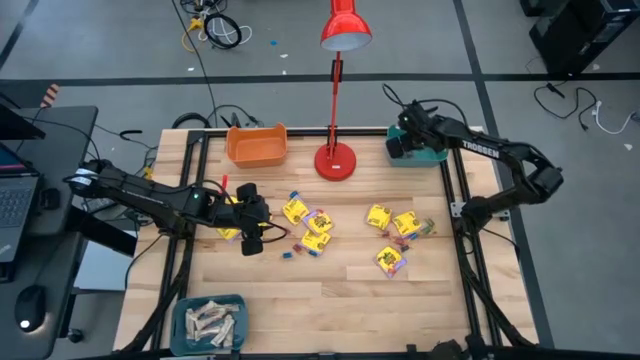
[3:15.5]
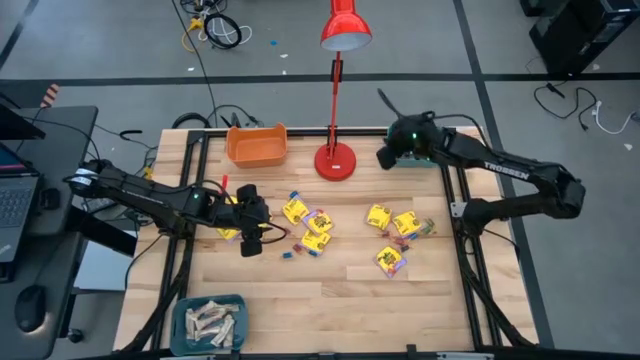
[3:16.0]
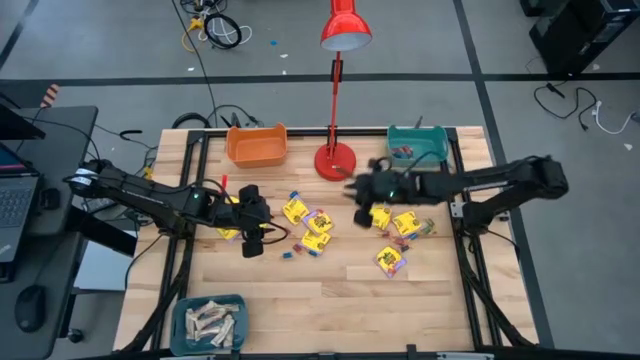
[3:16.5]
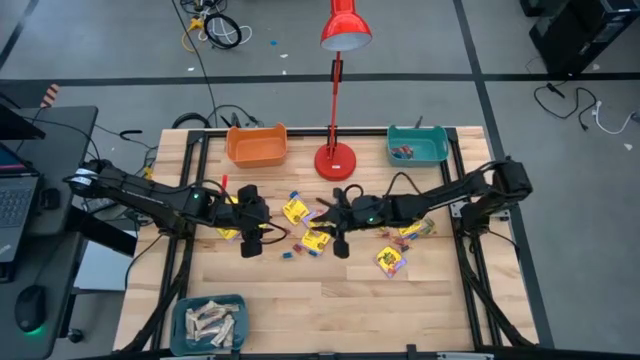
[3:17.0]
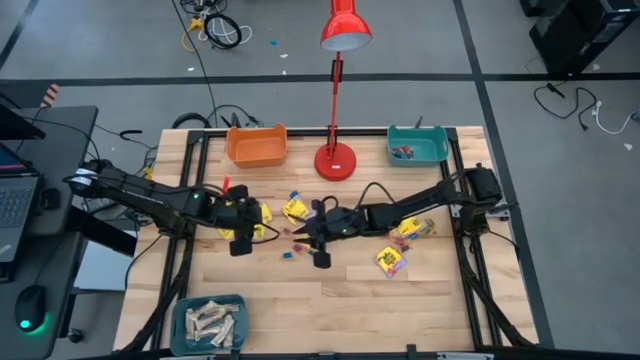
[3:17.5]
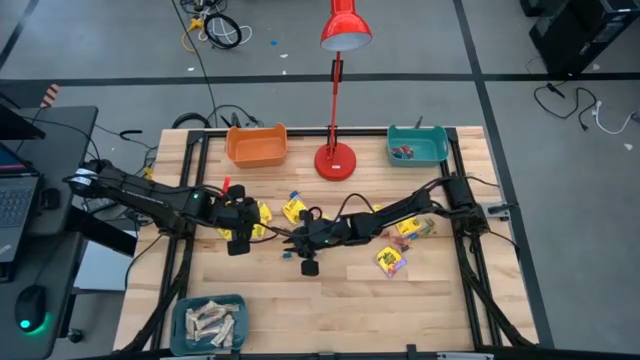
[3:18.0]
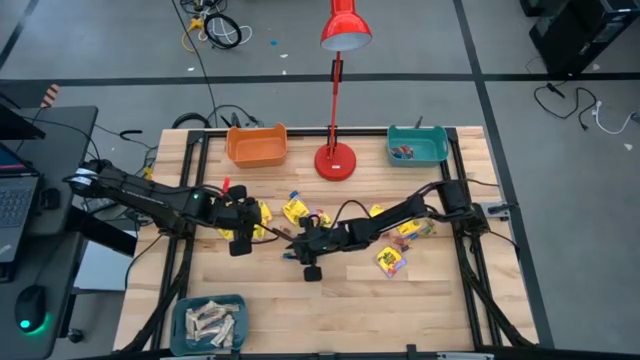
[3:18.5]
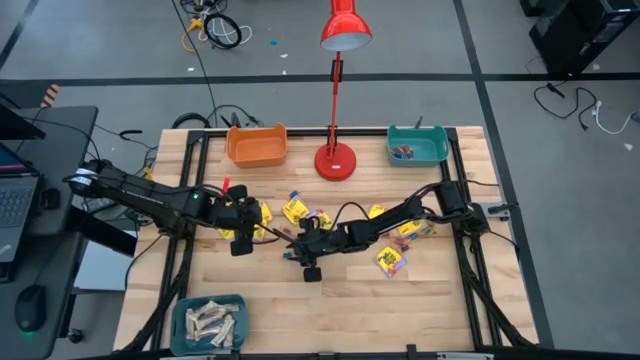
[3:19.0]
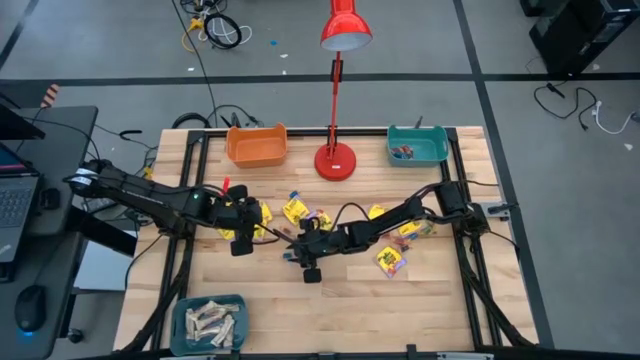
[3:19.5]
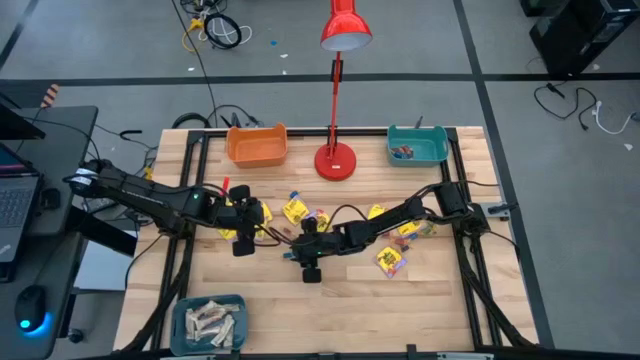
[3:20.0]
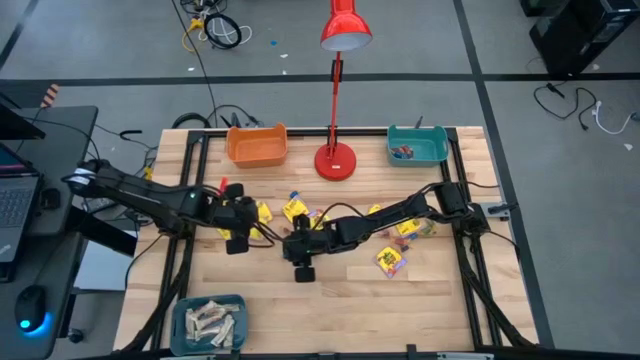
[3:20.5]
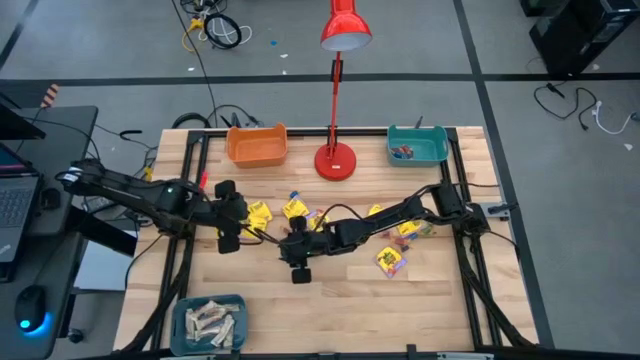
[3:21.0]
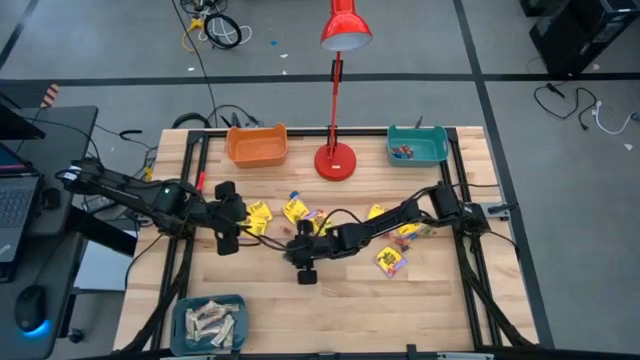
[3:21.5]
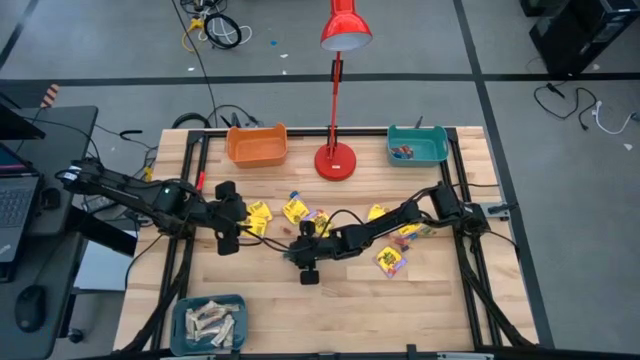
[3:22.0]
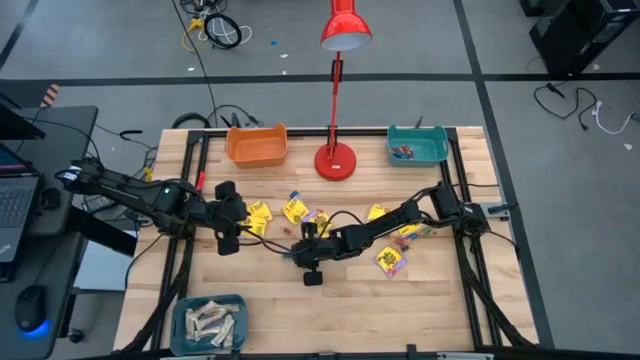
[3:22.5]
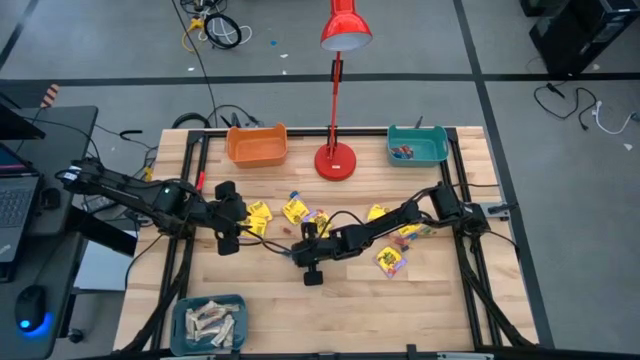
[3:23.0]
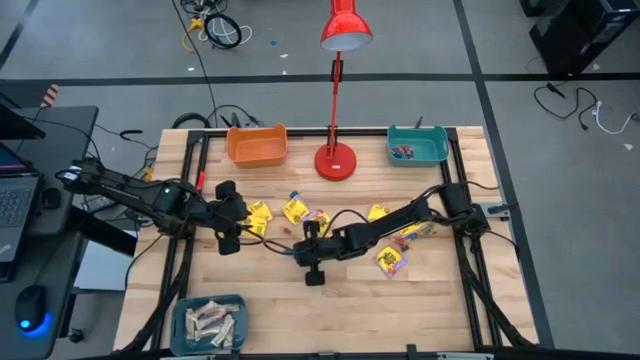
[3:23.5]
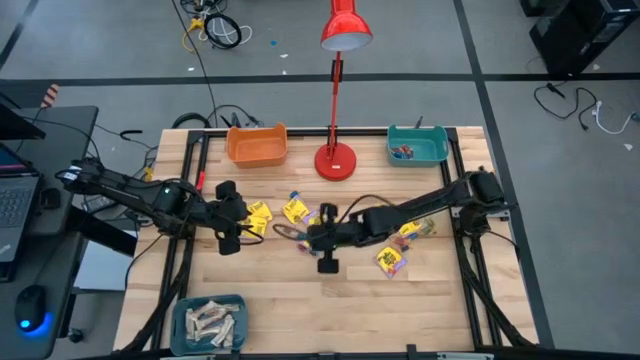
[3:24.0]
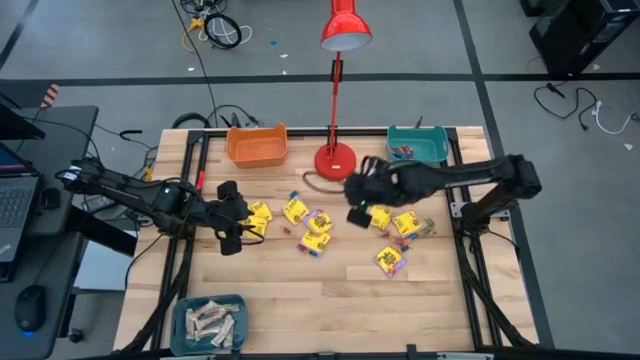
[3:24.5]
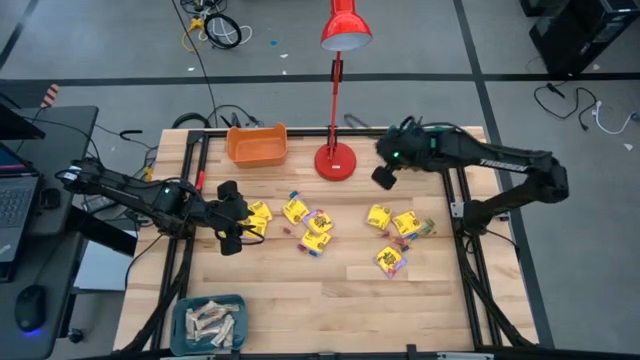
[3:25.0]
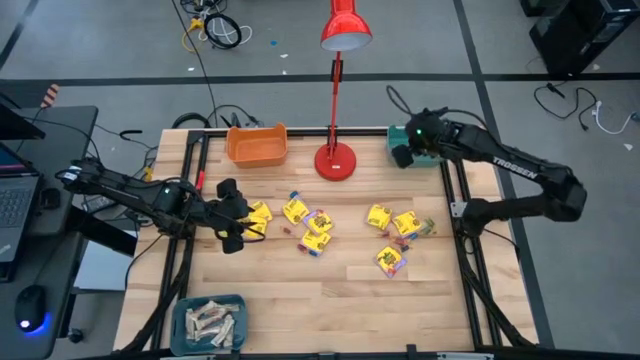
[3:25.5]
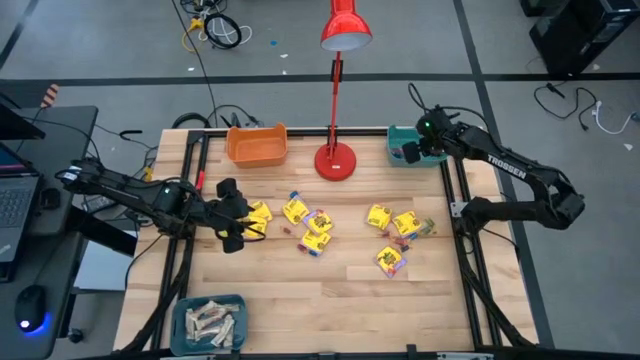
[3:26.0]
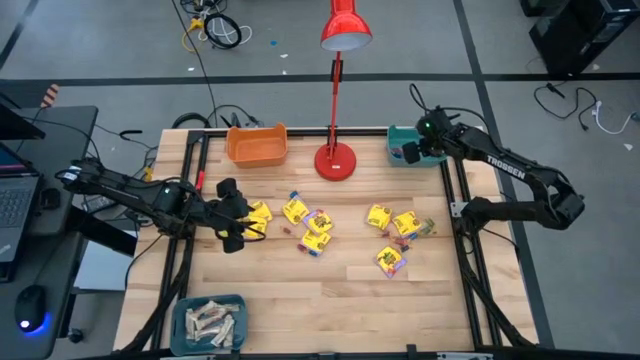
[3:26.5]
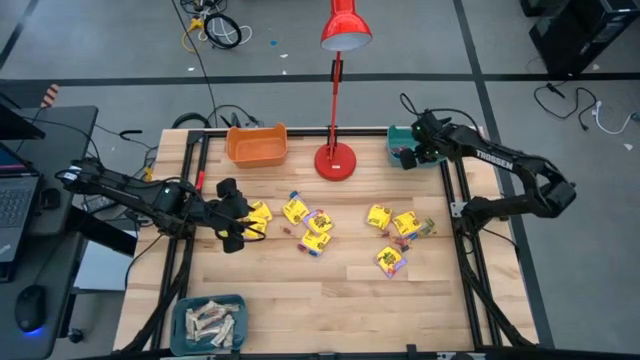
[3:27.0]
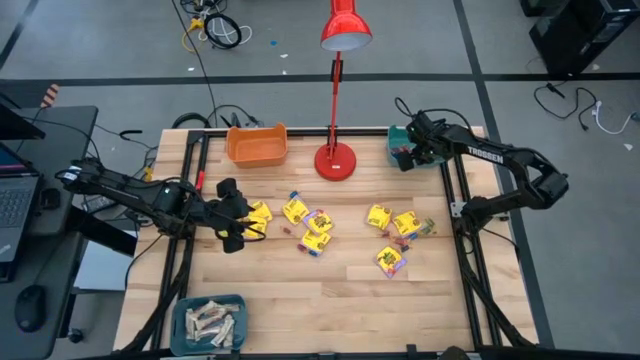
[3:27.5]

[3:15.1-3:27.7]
Task: Sort candy
Put the small blue candy into the green bin

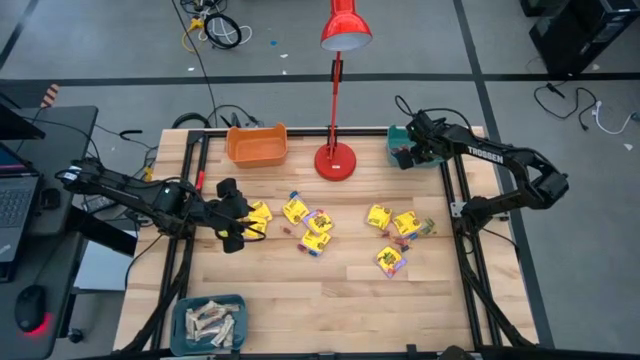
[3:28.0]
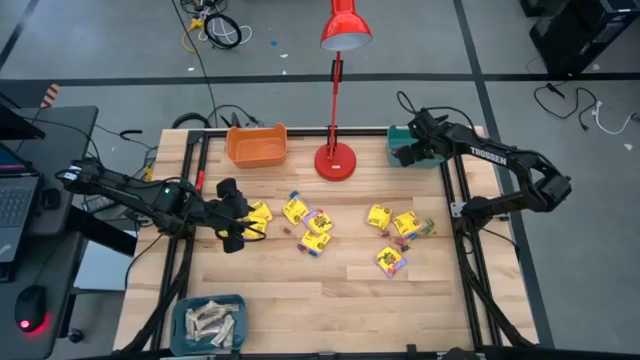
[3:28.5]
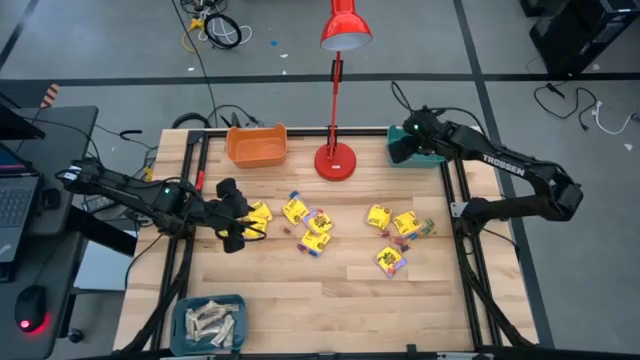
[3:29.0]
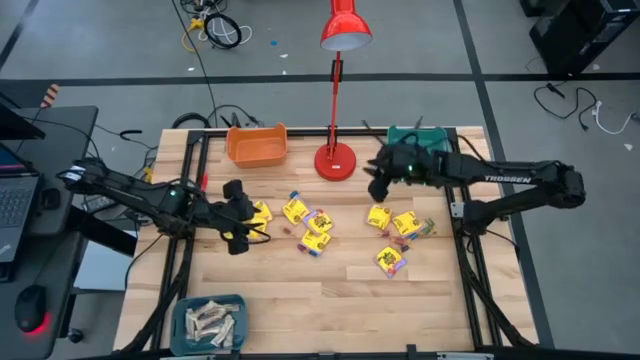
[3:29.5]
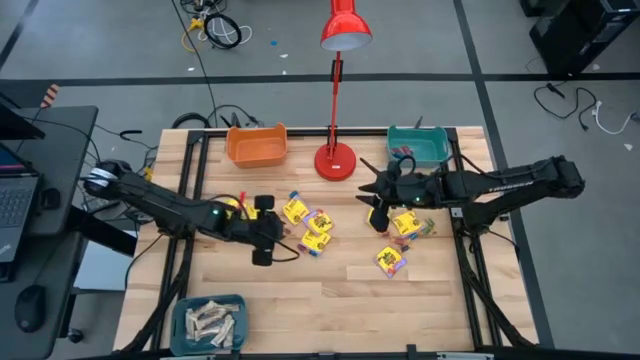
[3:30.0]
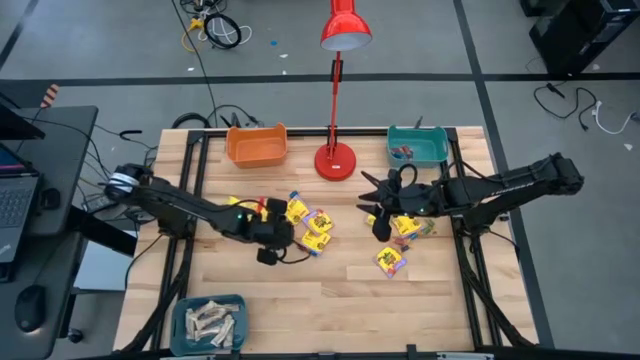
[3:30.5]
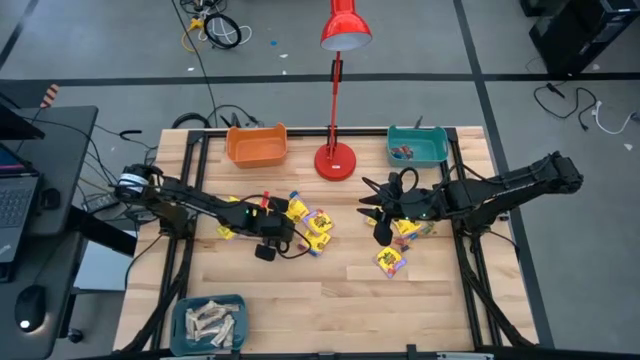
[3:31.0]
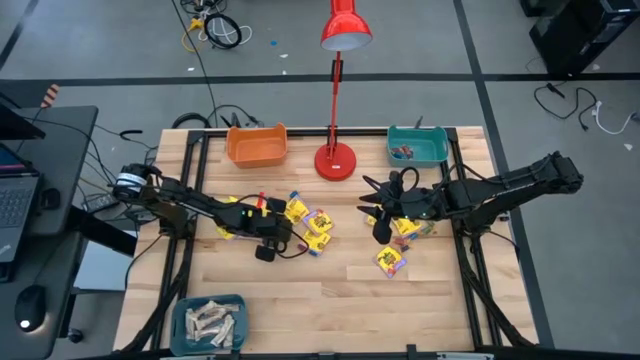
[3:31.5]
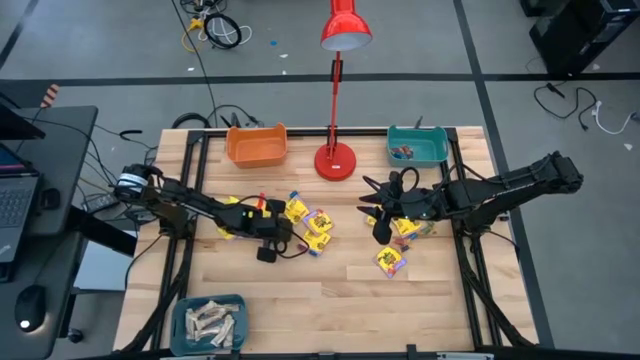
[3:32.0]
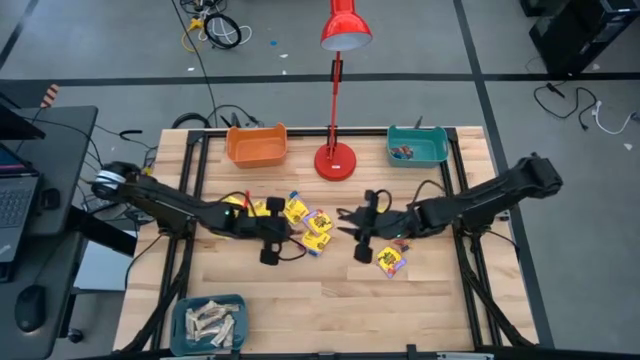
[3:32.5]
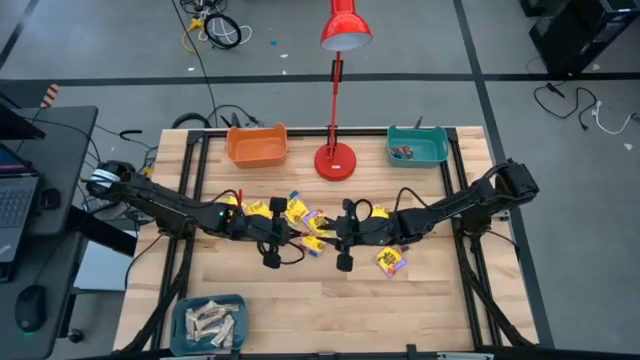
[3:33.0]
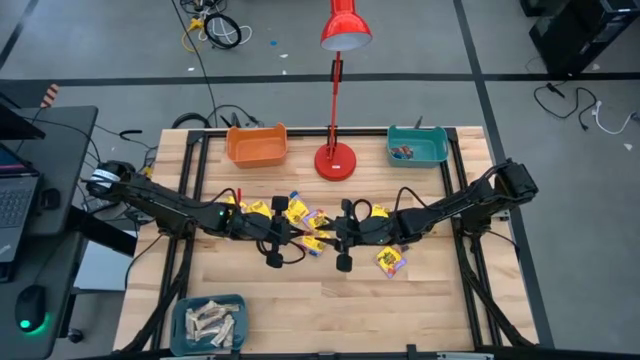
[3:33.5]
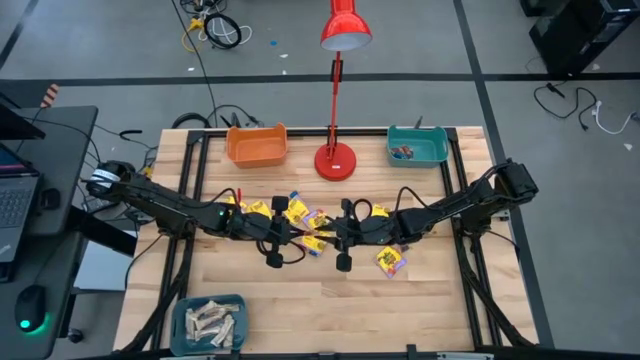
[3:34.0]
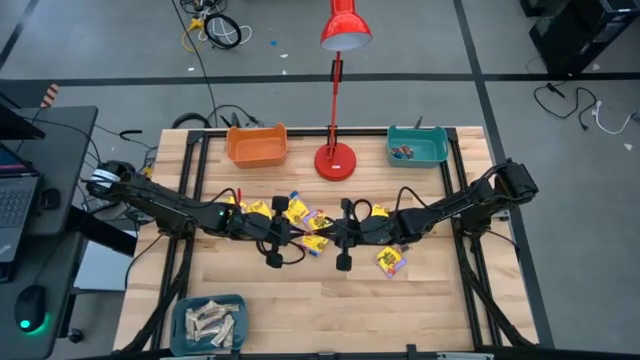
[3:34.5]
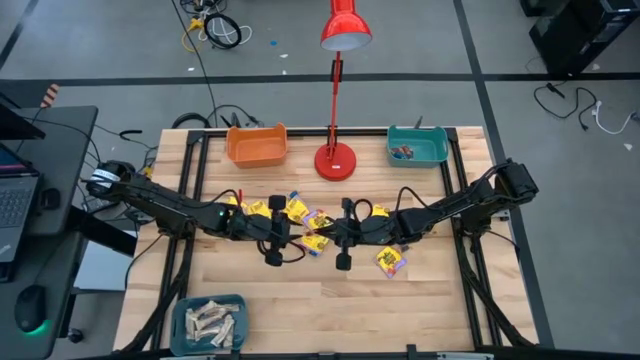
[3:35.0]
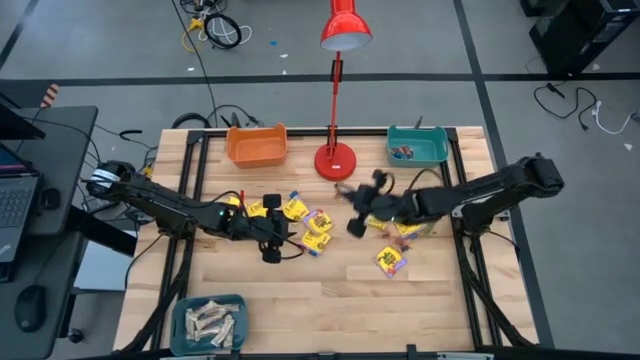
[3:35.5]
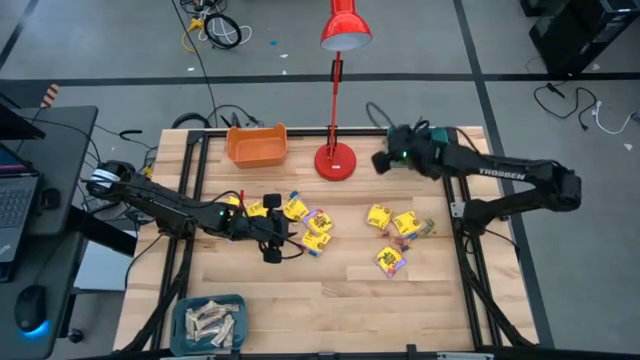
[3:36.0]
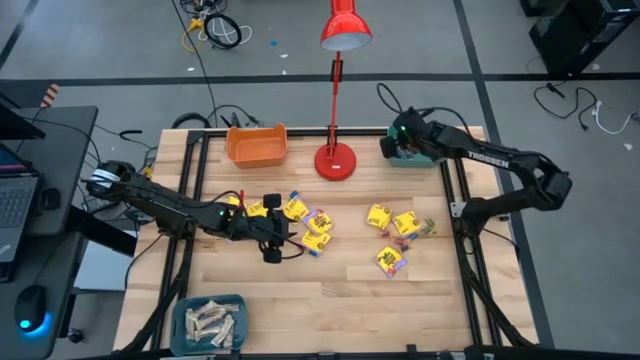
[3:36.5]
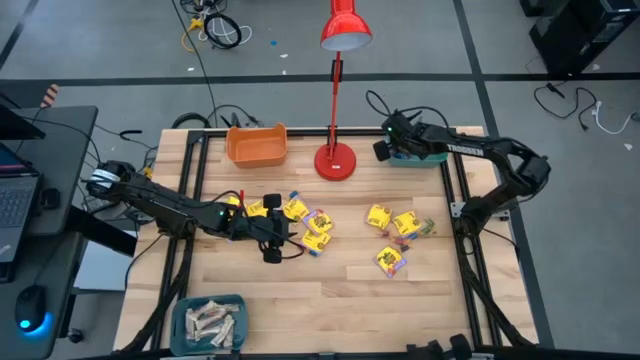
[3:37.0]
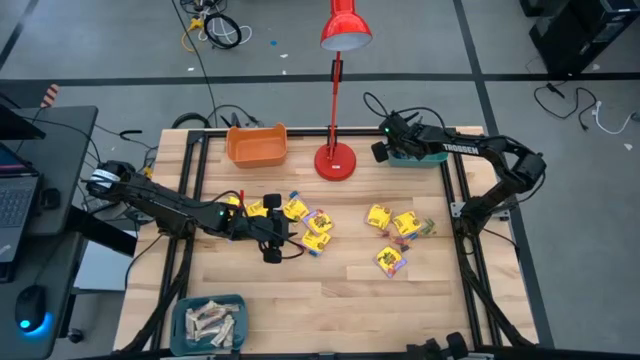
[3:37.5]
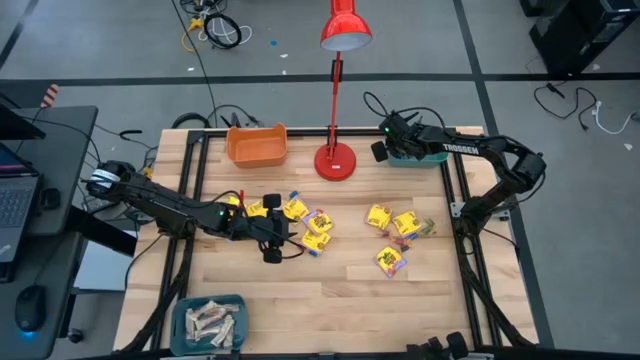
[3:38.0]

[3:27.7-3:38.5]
Put the small red candy into the green bin
